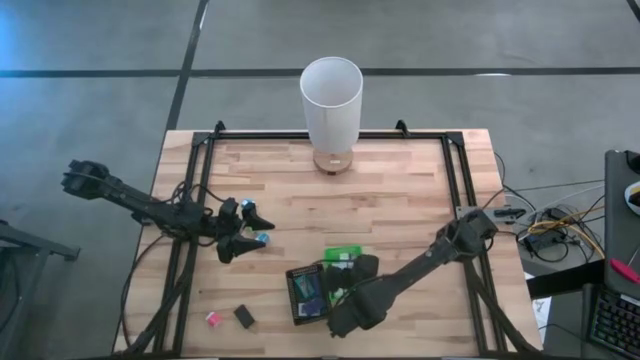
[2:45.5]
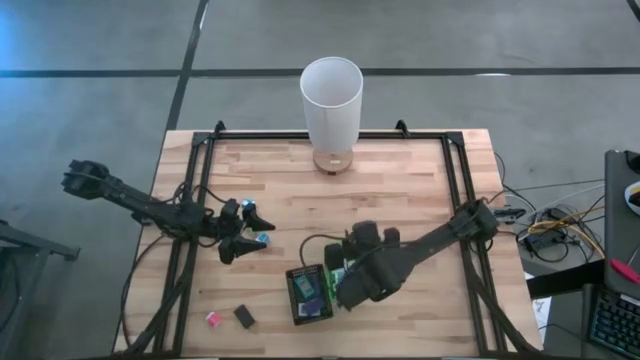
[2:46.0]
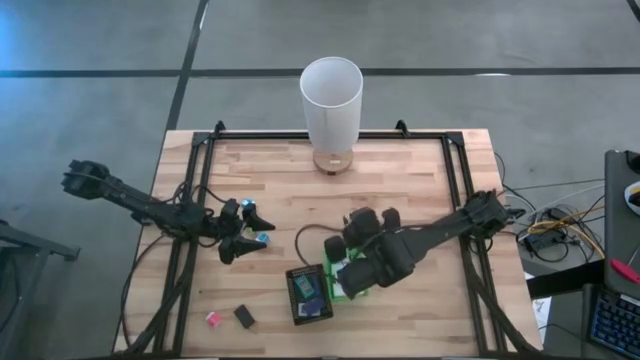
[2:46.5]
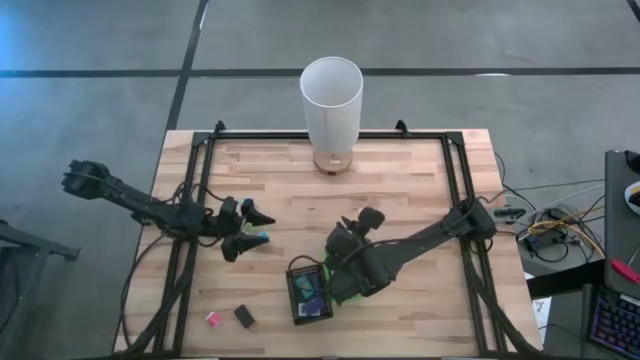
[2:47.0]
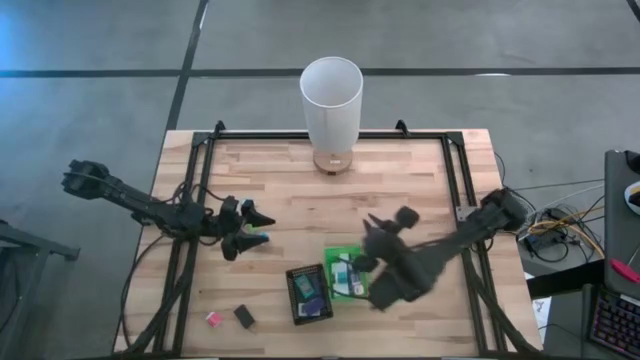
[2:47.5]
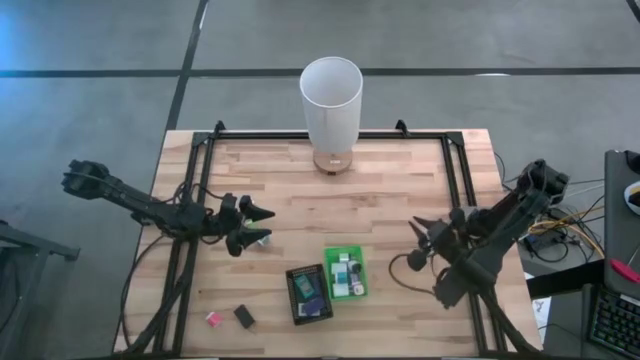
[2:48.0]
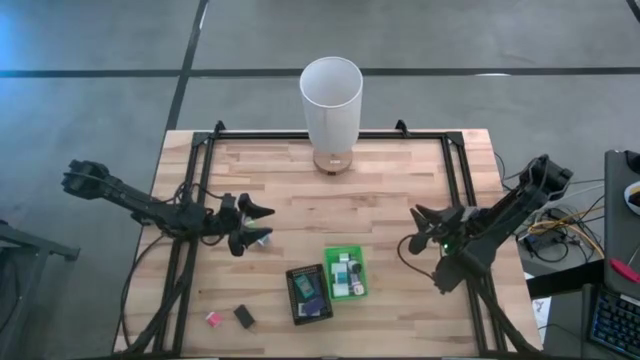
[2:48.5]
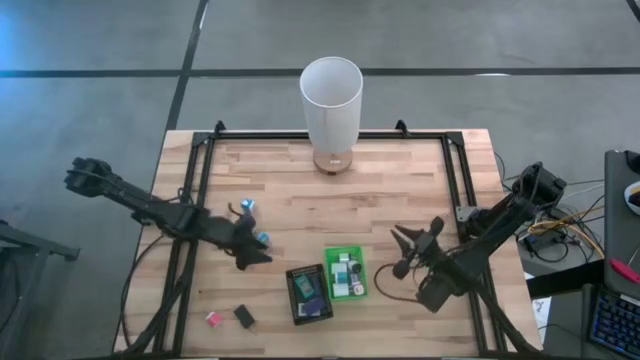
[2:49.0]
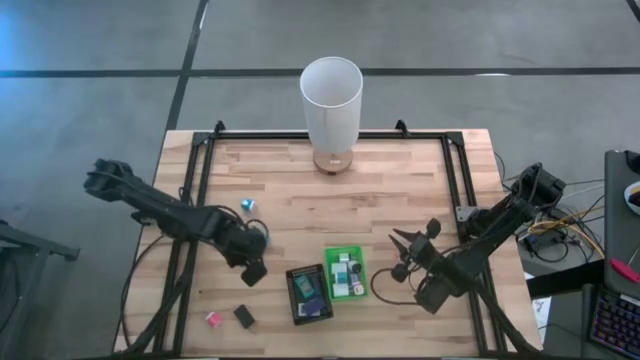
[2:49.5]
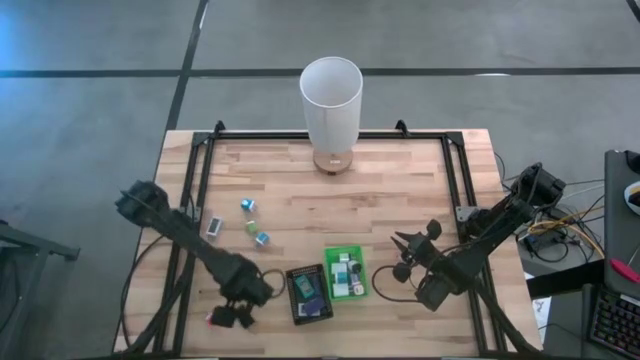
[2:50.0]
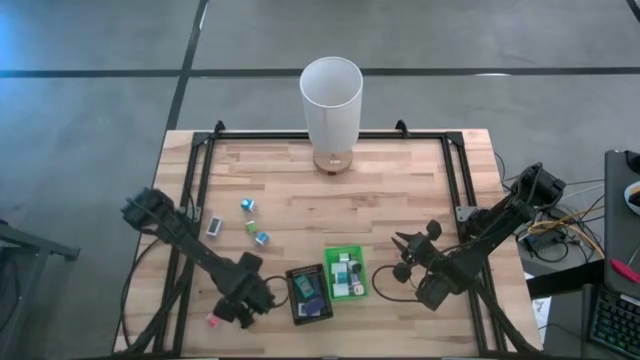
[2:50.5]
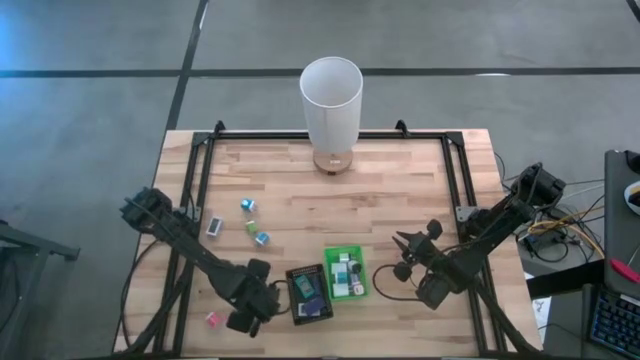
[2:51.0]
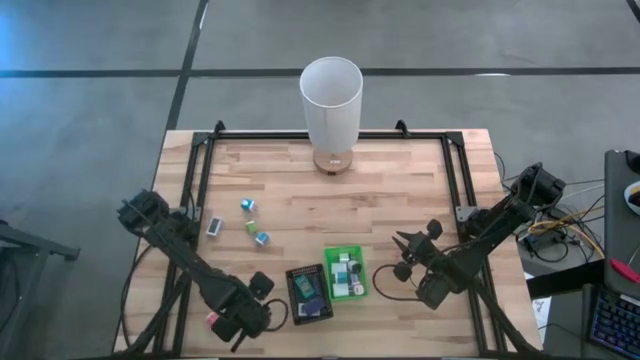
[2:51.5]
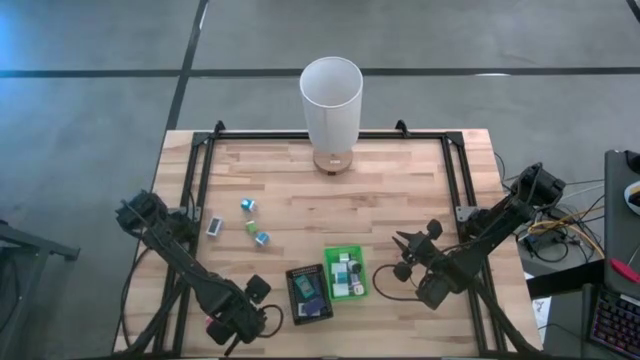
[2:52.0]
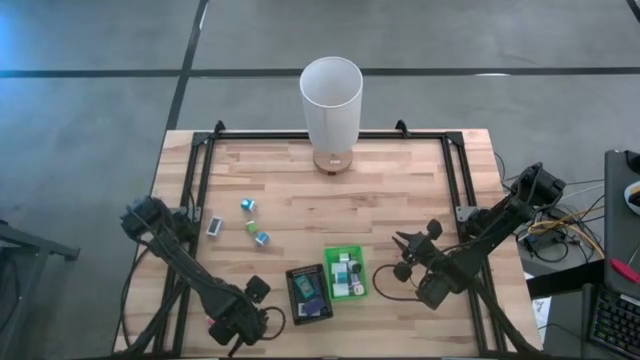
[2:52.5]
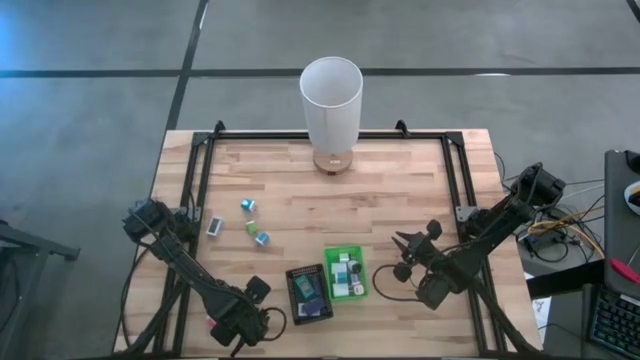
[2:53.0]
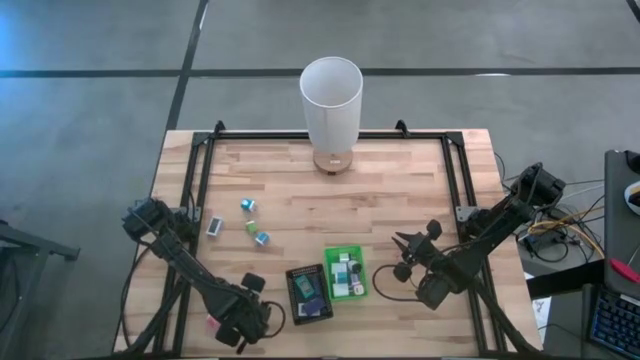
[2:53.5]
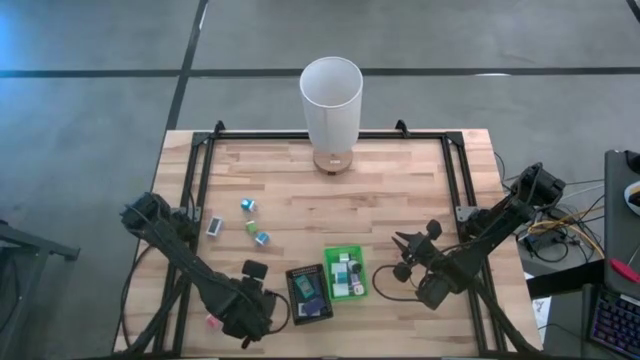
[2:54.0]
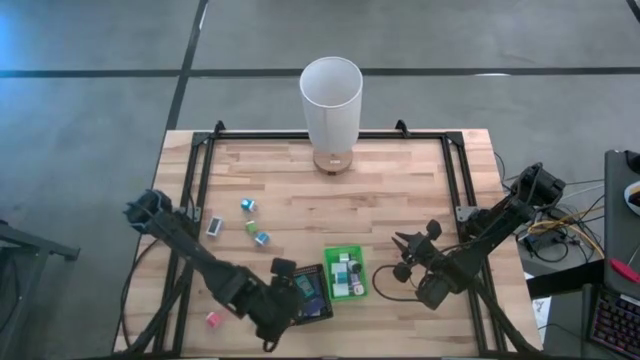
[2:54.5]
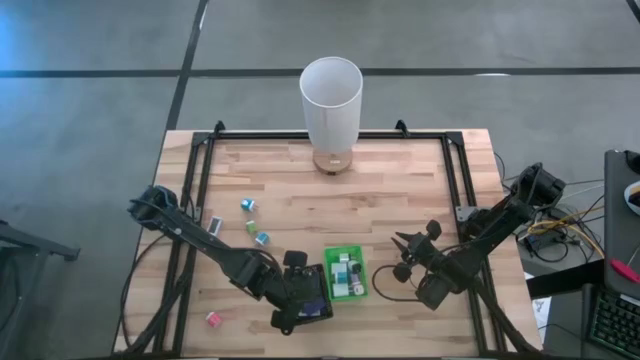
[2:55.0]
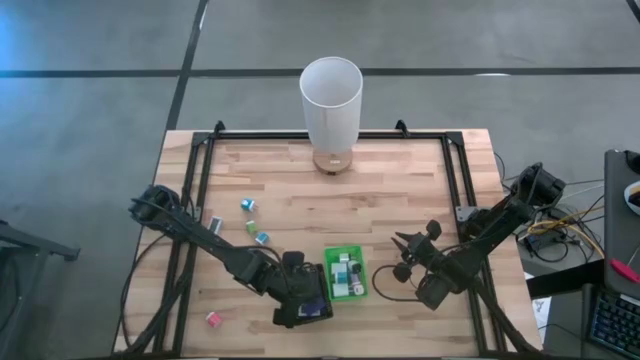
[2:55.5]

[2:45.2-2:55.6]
Task: Pick & Place Office items
Put the black digital clock into the black bin

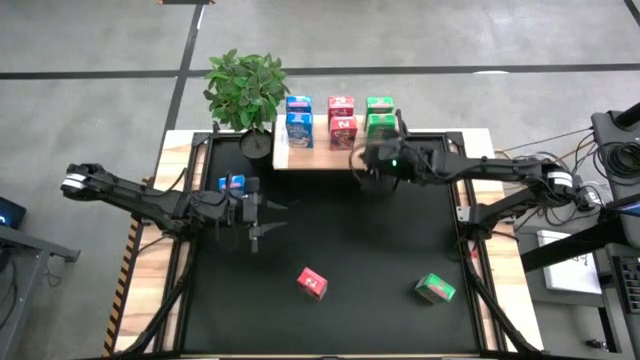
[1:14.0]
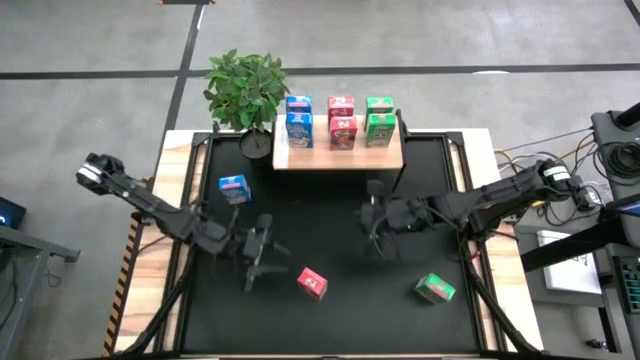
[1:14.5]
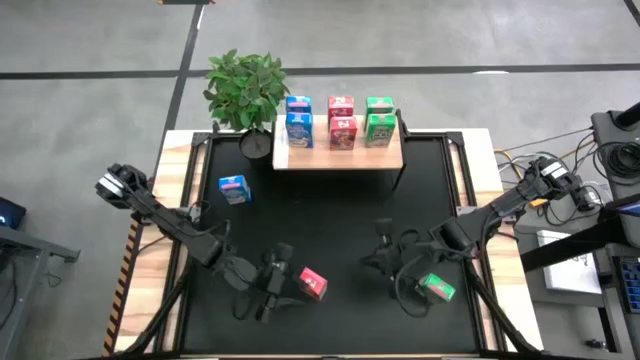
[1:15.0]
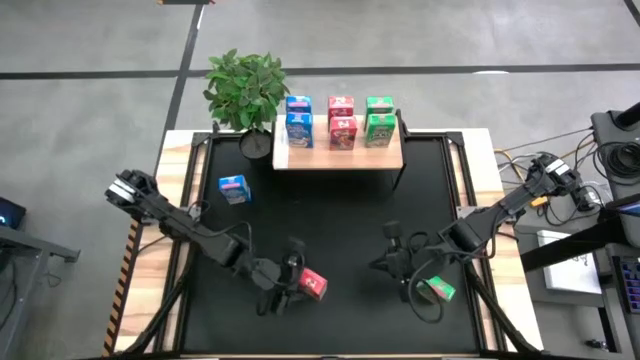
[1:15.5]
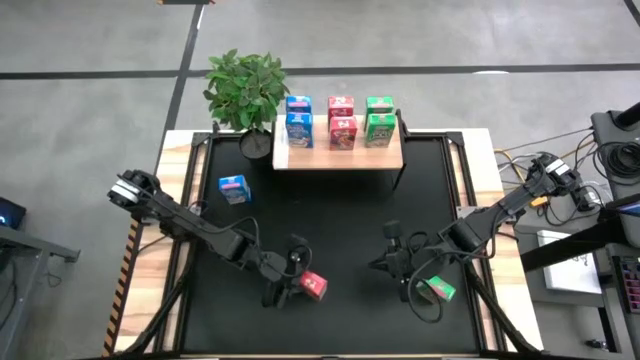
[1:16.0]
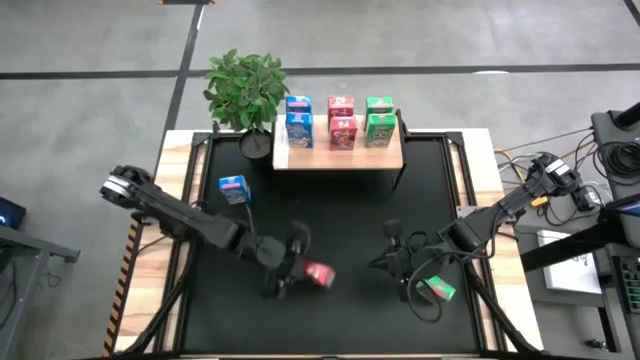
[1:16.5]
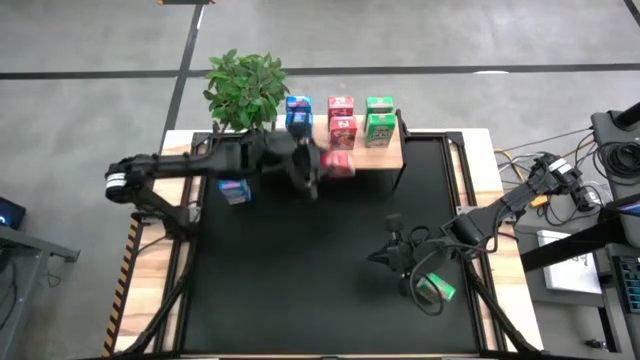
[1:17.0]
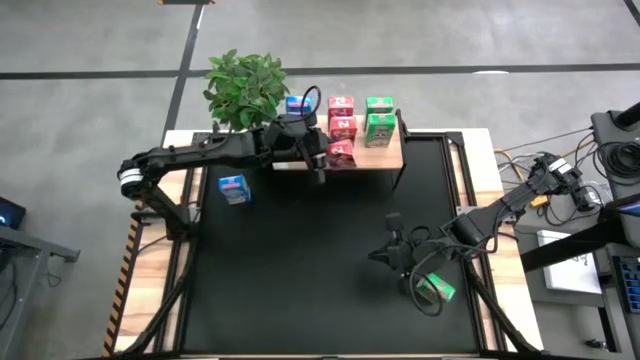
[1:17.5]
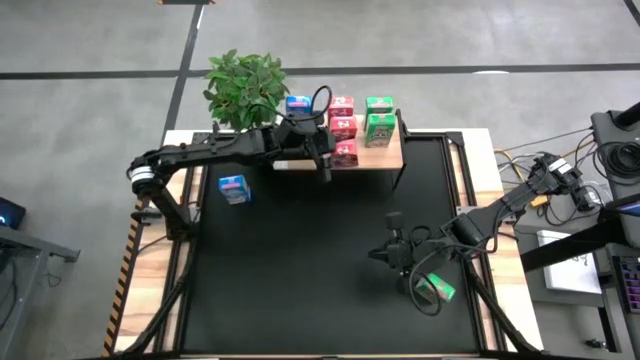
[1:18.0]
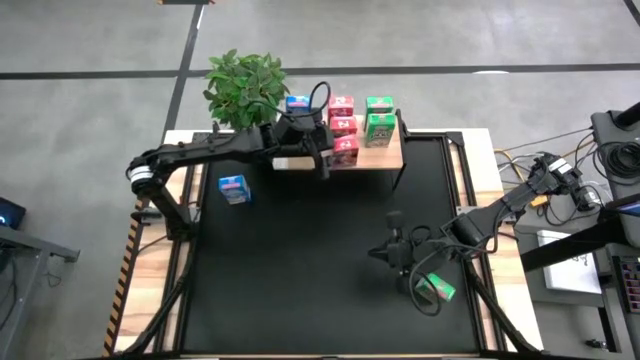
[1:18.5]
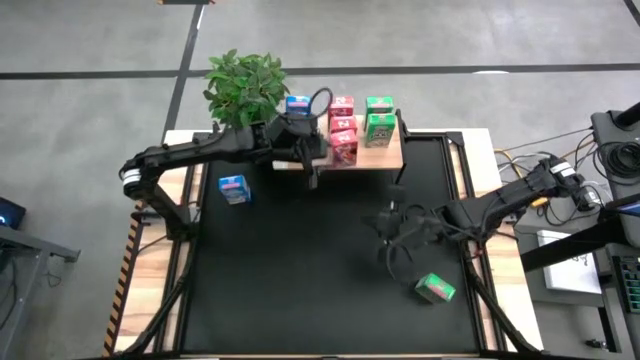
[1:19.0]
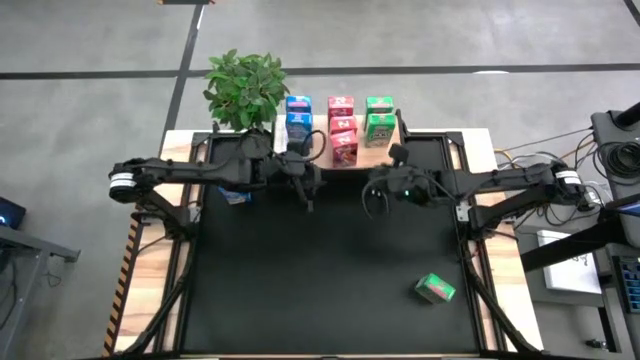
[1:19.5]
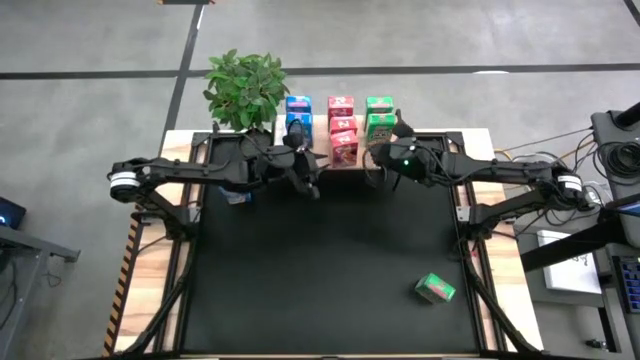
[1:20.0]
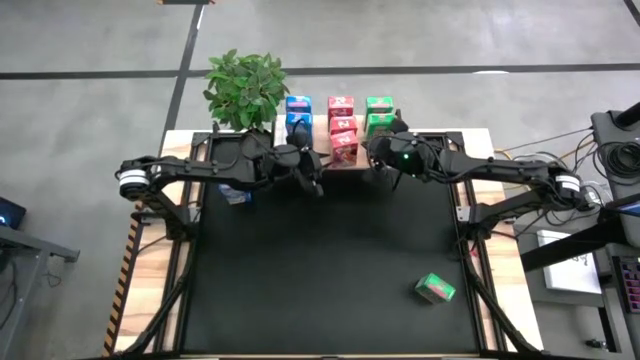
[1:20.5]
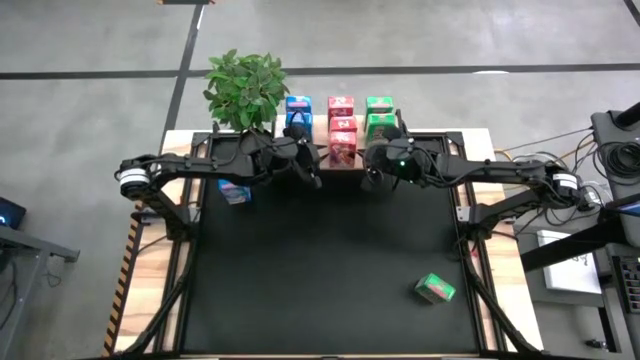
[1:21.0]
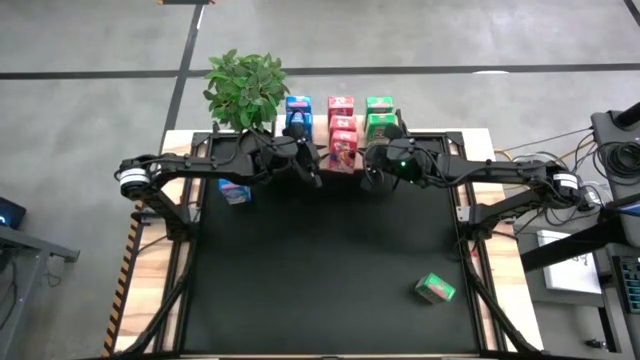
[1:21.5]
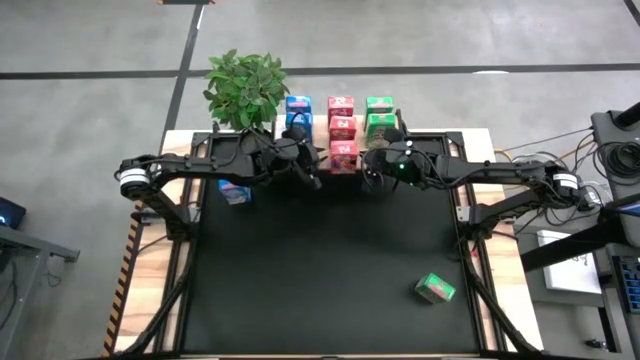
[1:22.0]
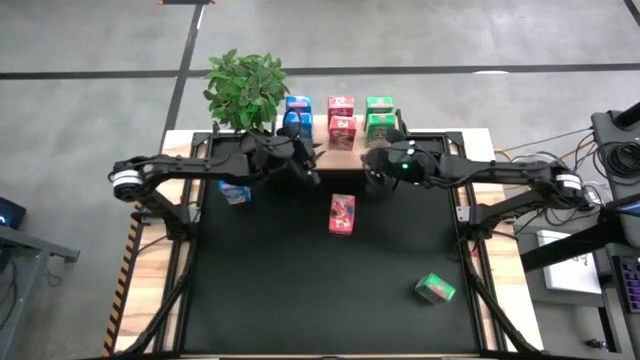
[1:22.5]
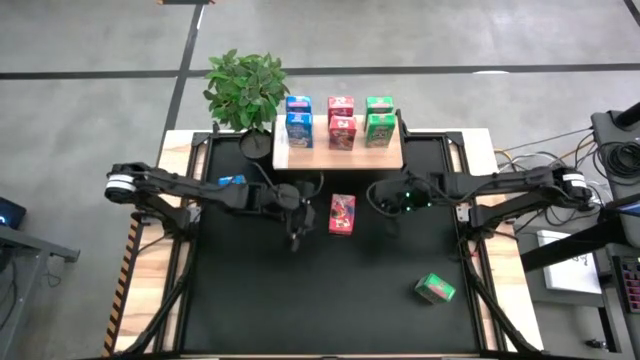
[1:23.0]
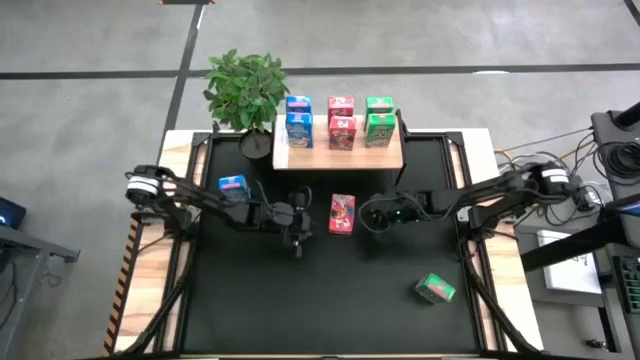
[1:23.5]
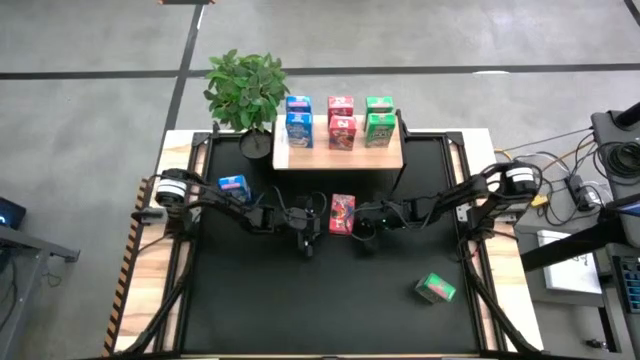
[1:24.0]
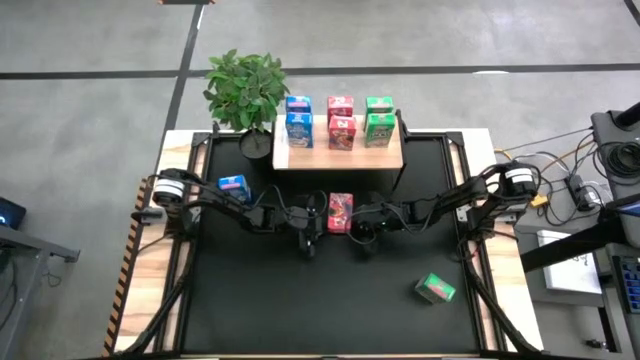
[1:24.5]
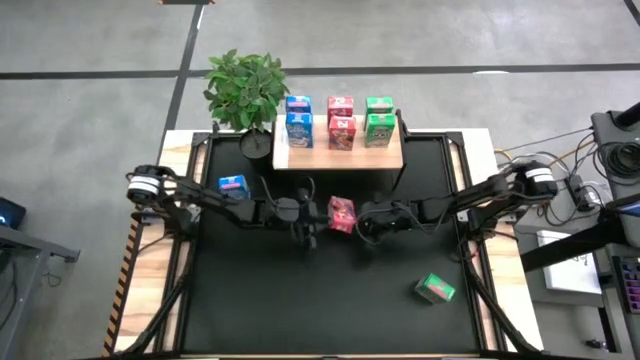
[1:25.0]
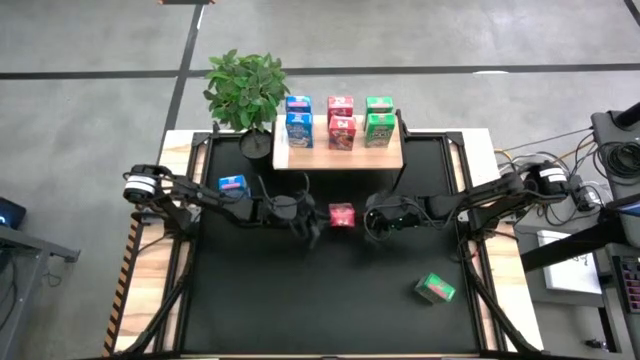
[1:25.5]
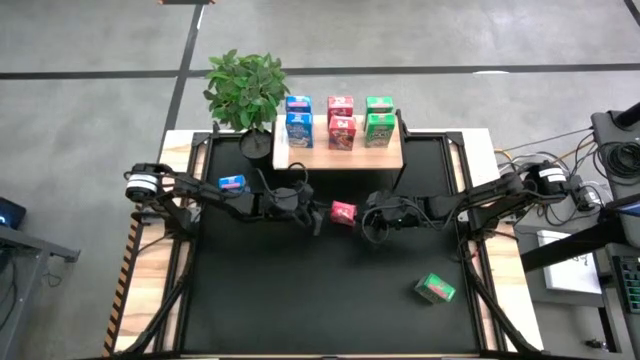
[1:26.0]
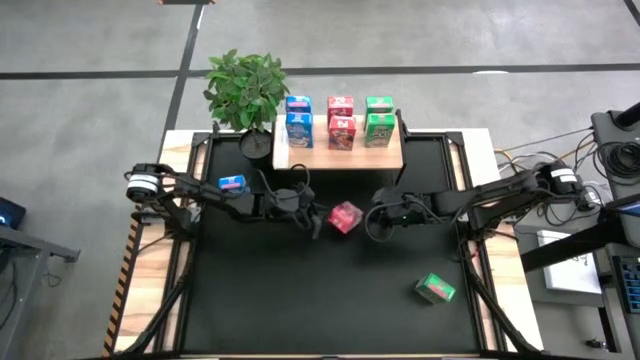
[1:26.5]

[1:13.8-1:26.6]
Task: Stack cereal on shelf
Put the red cereal box aligned with the other red cereal boxes on the shelf
